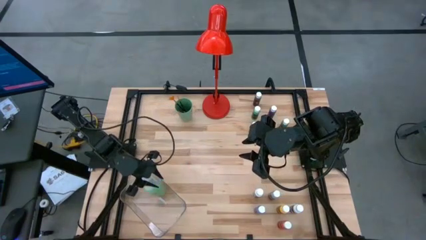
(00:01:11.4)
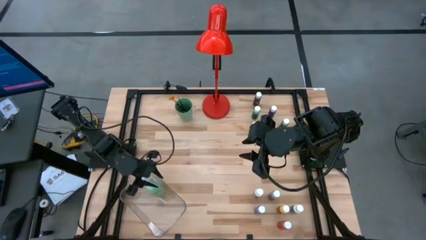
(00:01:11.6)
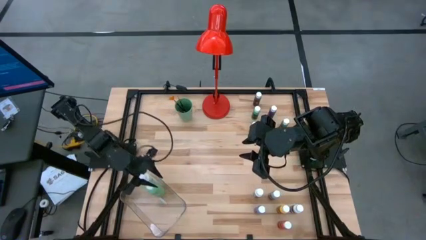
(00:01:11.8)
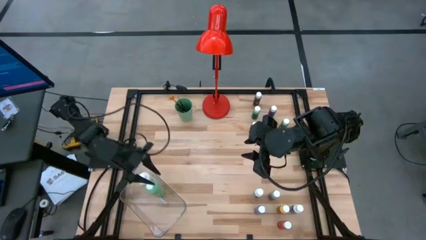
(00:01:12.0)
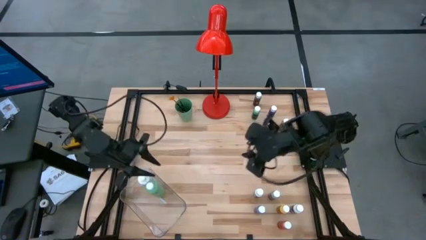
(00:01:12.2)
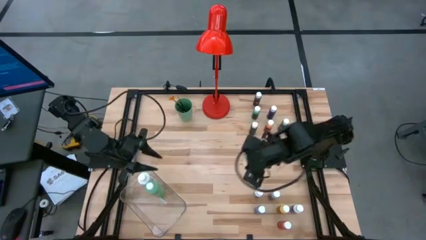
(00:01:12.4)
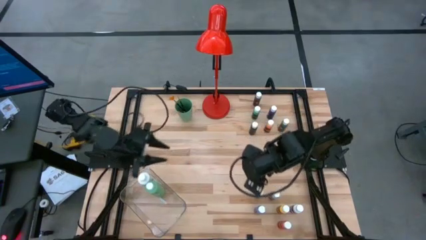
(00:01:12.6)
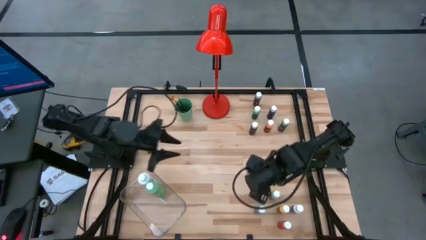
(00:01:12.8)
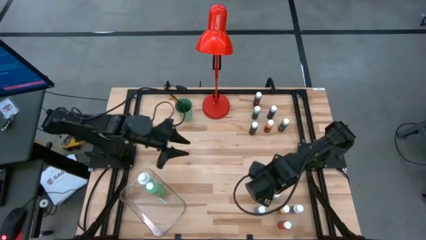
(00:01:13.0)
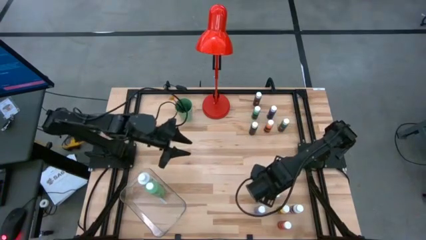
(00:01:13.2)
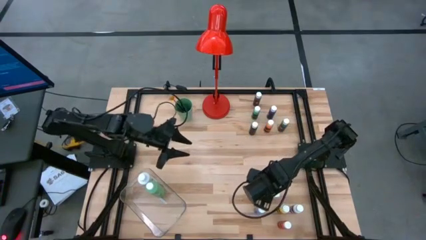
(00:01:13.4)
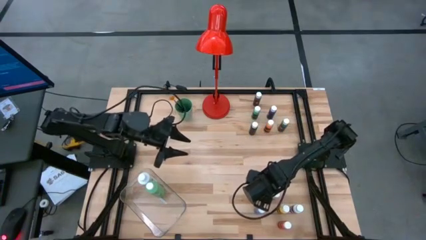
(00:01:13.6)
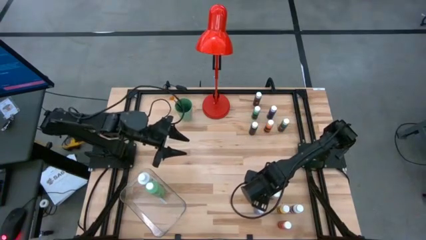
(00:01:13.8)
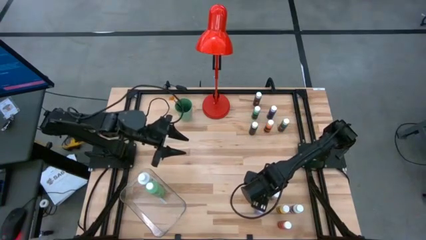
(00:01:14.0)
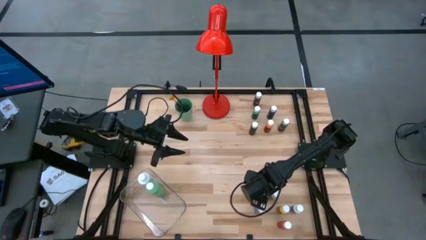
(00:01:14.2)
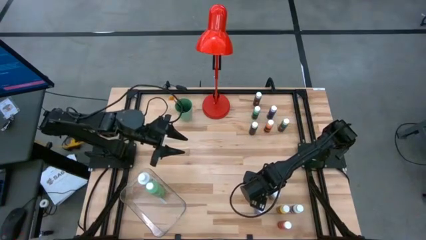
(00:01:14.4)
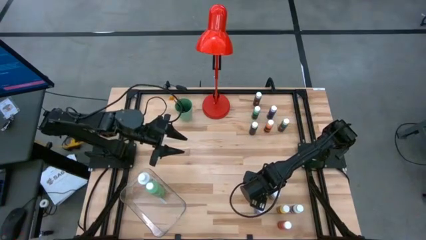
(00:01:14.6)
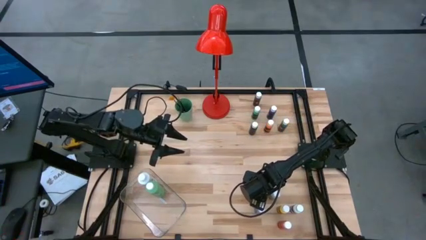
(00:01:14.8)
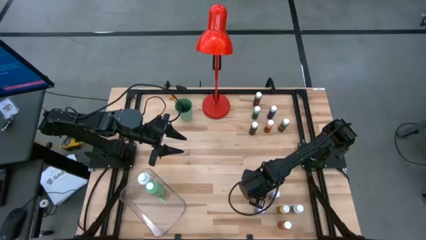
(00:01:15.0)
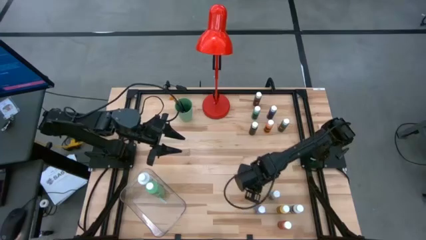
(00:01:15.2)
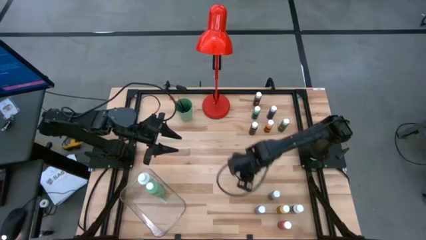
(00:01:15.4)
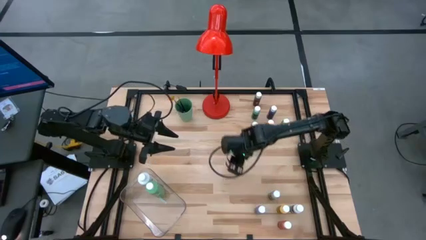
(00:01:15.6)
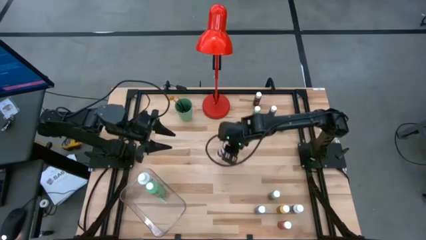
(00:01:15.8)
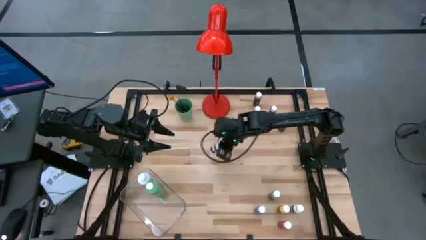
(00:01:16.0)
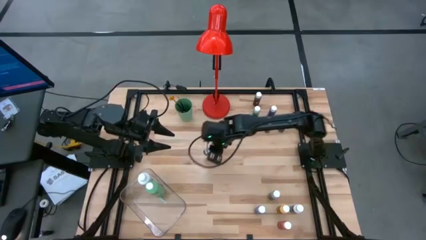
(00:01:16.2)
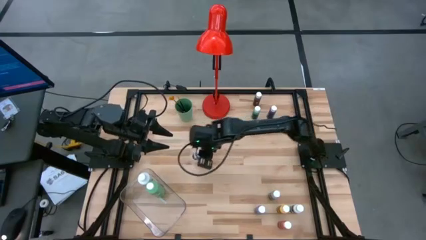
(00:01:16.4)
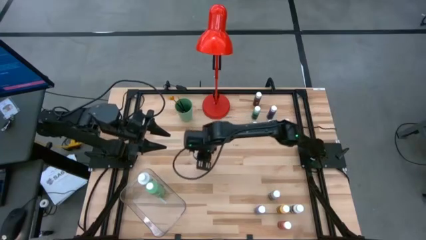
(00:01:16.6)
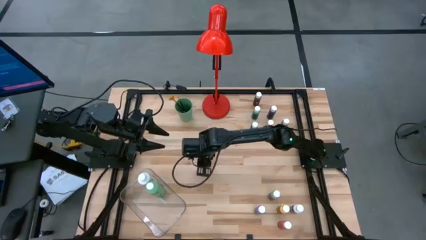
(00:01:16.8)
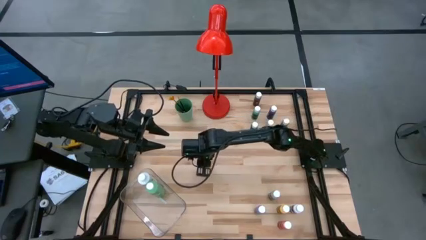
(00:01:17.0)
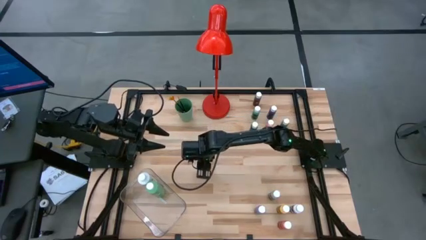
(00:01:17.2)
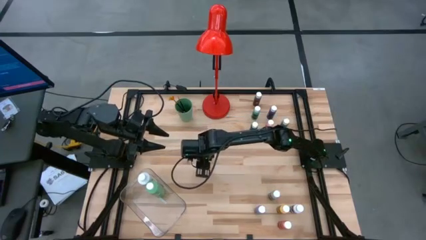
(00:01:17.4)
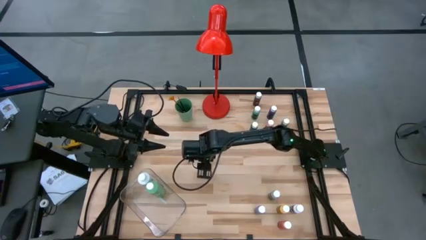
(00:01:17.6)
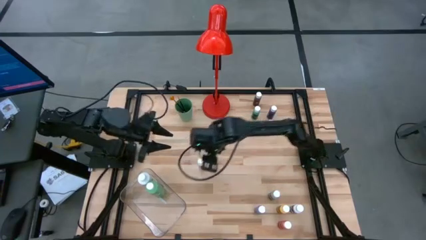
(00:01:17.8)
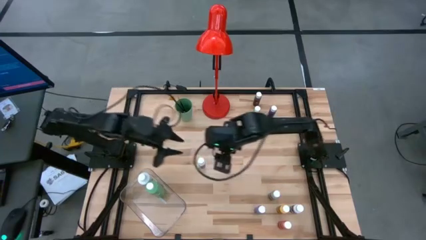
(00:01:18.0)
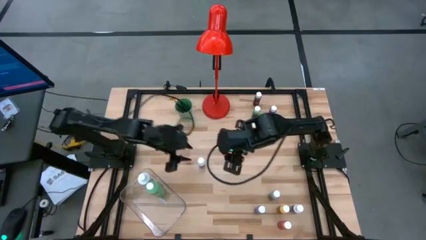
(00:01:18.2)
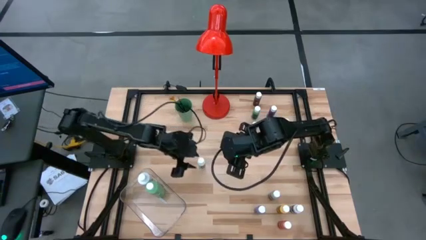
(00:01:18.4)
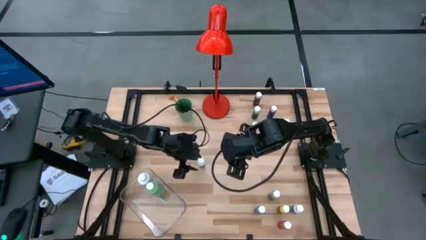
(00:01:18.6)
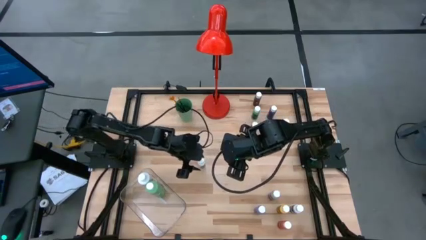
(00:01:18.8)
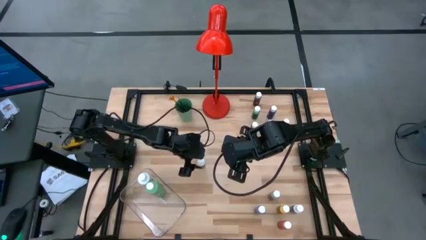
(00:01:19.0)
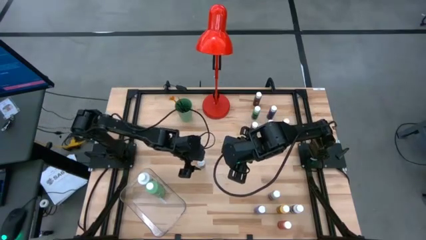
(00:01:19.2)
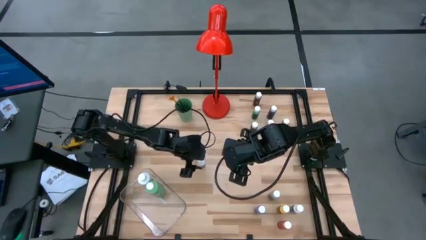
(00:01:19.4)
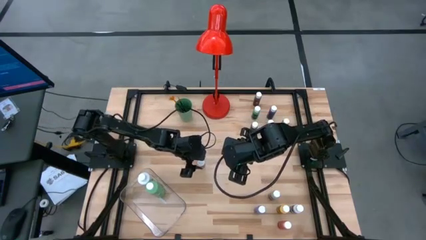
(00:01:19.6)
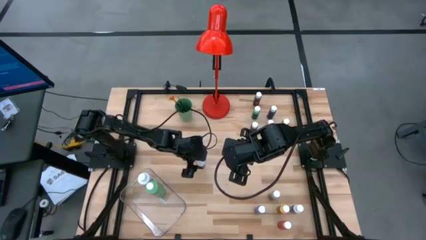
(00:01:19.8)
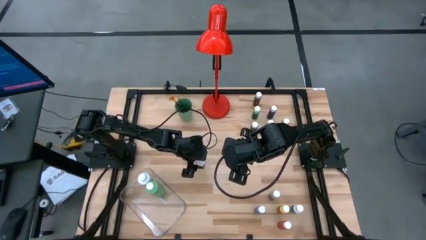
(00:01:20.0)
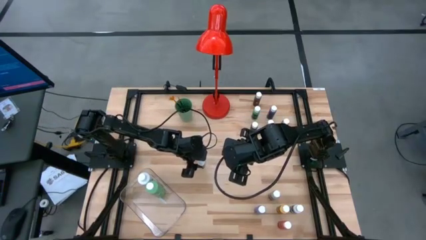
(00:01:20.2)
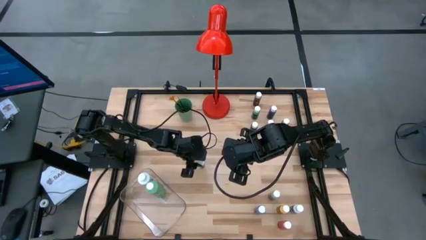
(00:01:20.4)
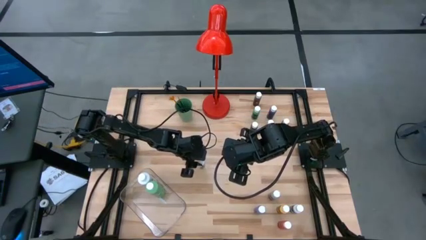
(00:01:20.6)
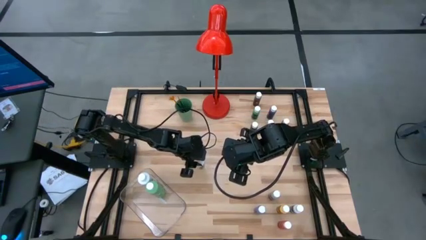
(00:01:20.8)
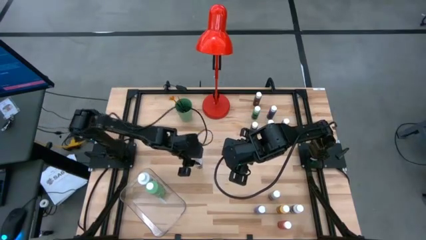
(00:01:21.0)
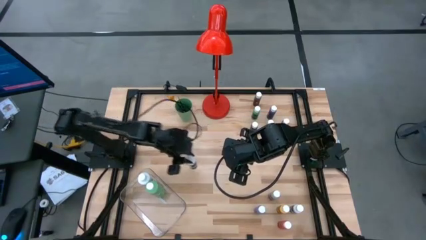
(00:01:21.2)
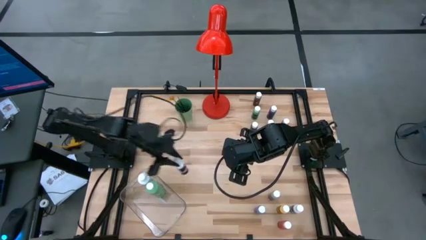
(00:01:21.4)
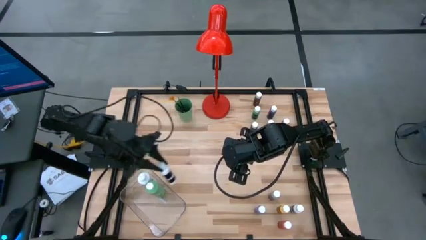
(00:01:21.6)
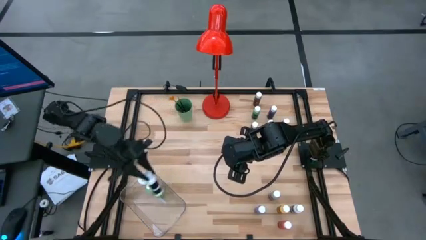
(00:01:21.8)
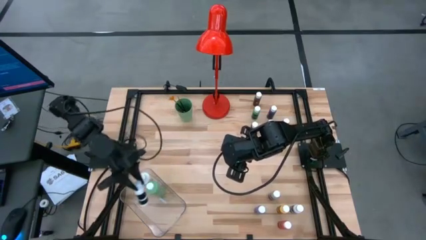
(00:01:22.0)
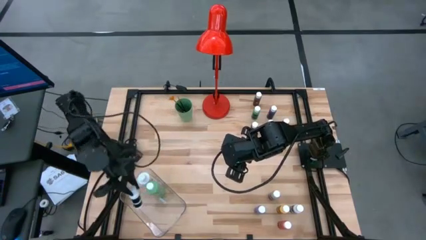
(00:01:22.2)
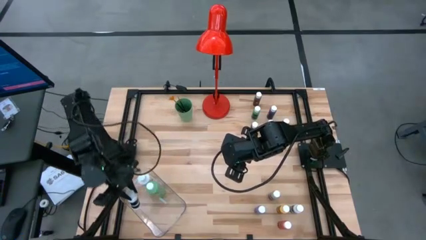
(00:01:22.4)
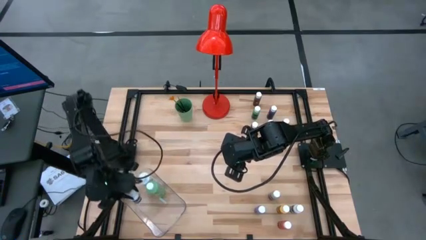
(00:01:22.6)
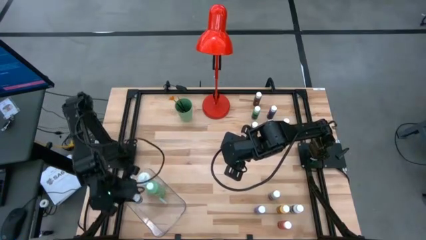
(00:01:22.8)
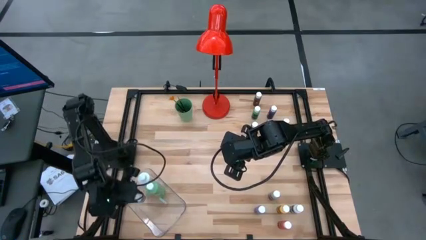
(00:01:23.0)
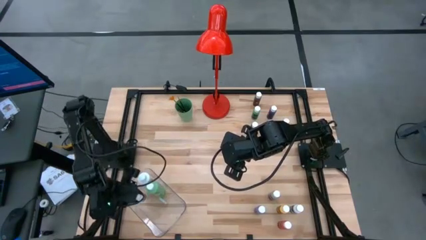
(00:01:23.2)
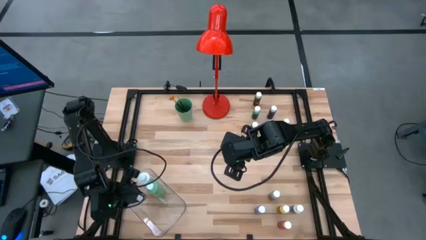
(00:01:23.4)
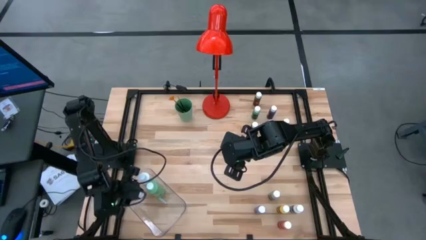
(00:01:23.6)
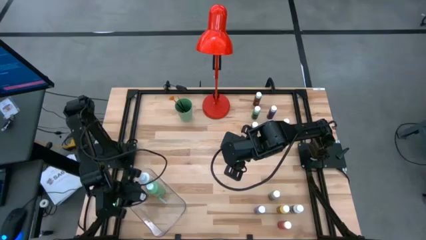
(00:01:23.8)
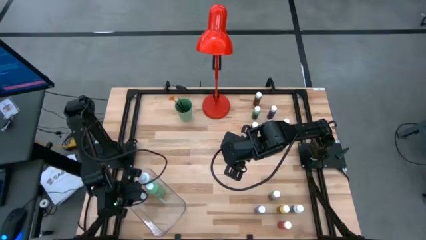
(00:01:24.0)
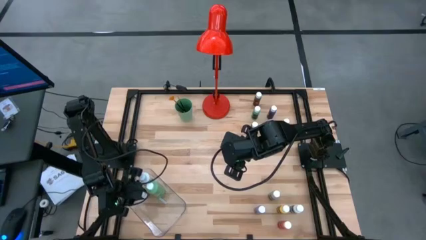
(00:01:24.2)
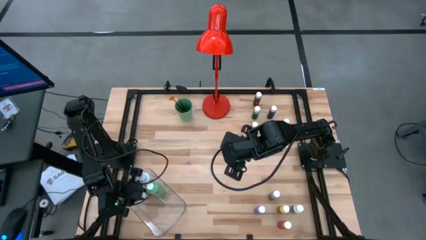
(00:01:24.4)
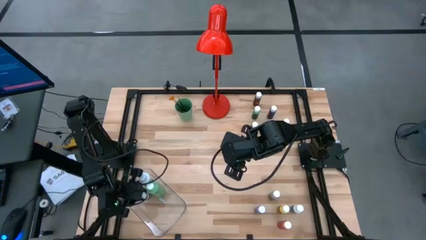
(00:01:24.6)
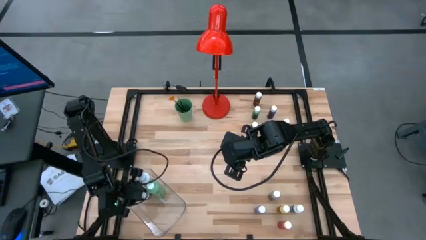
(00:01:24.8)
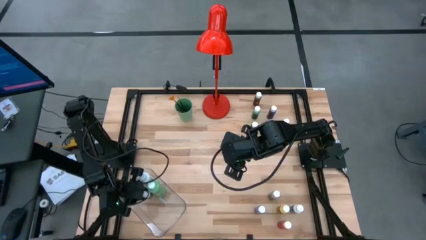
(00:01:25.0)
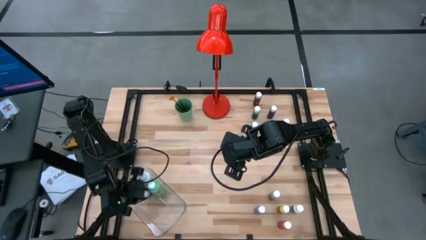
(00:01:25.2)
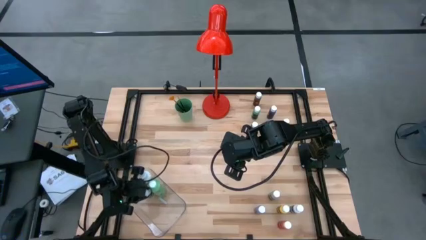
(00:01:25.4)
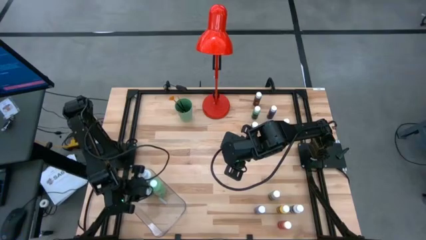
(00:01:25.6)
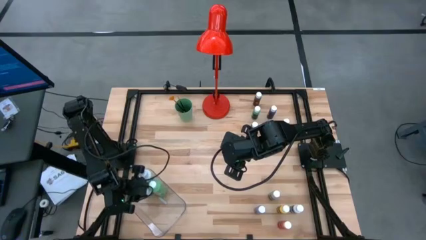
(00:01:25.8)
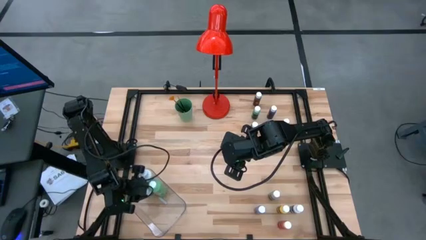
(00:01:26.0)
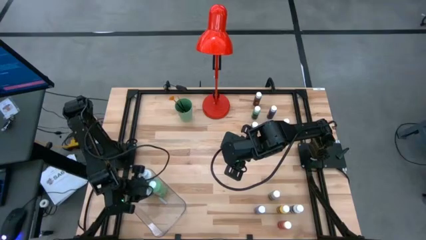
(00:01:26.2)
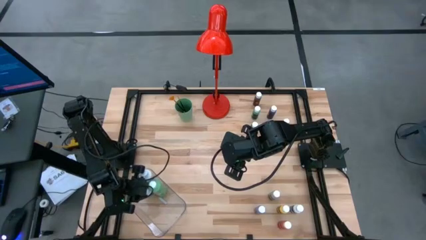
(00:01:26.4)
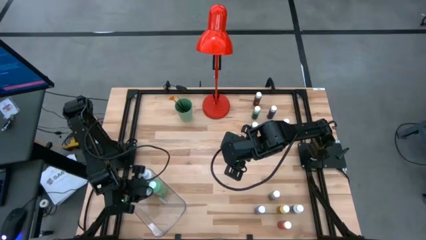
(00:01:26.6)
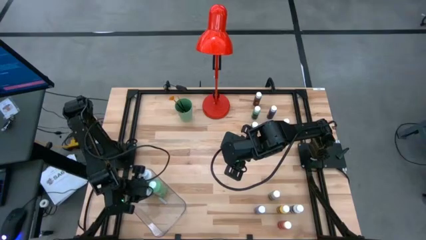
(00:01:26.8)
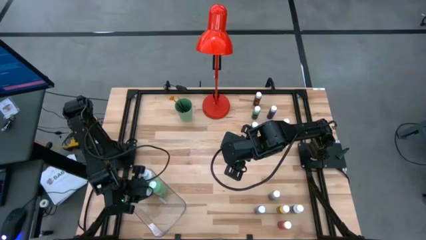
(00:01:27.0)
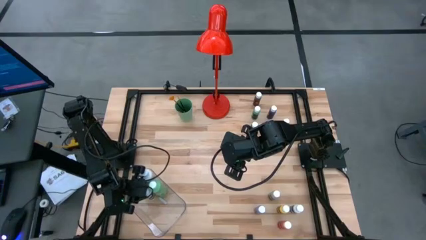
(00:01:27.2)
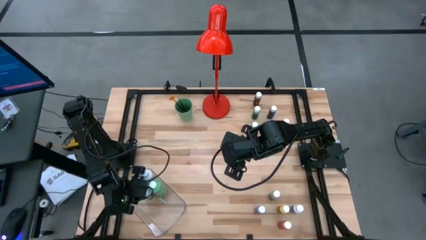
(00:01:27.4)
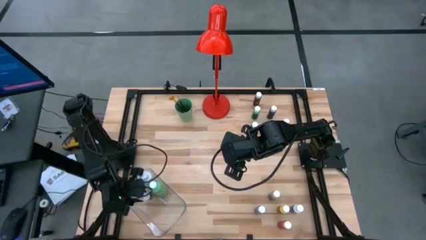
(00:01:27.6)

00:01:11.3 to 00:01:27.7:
Task: Pick & Place Paint Supplies
Put the white coloring bottle into the transparent bin
